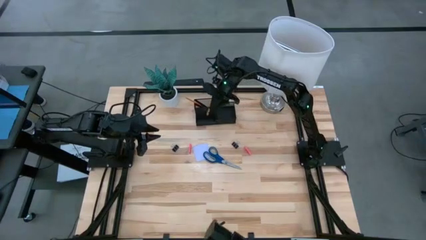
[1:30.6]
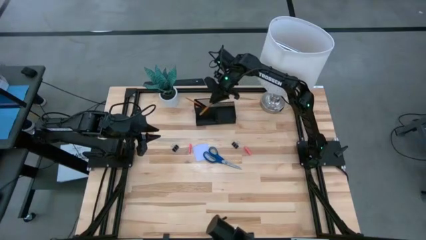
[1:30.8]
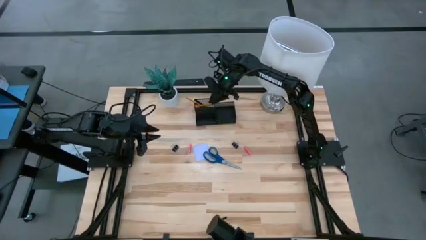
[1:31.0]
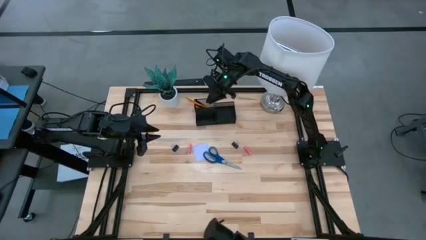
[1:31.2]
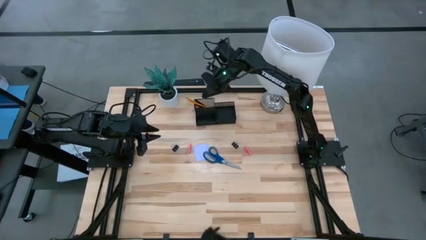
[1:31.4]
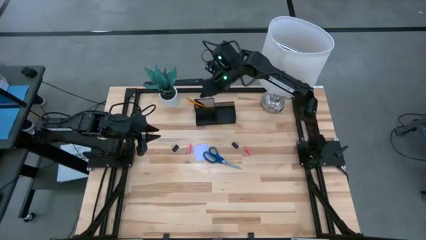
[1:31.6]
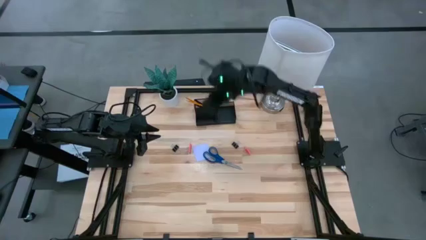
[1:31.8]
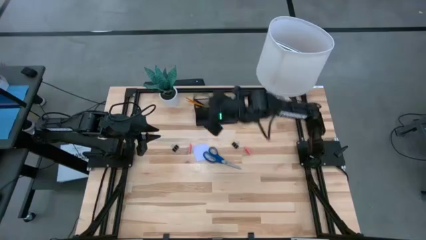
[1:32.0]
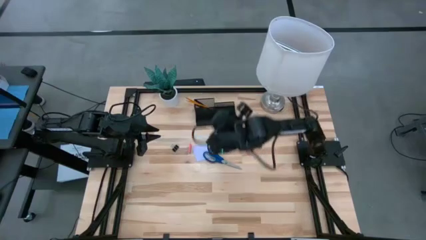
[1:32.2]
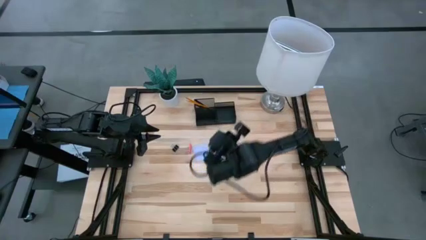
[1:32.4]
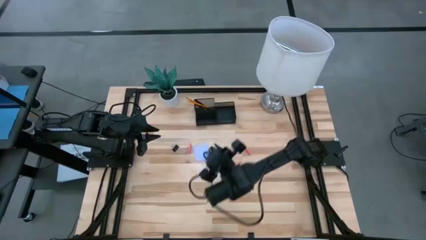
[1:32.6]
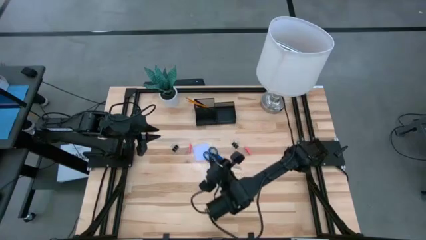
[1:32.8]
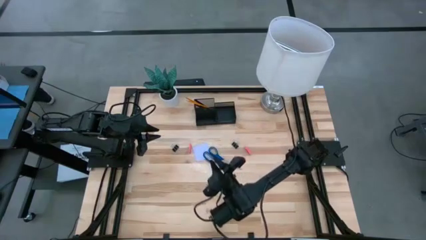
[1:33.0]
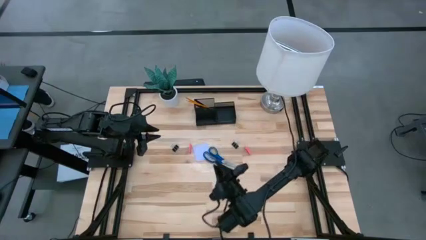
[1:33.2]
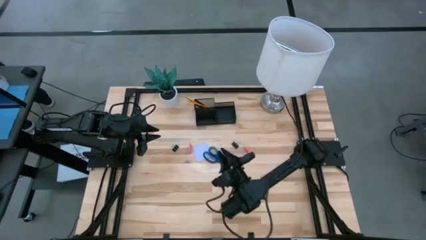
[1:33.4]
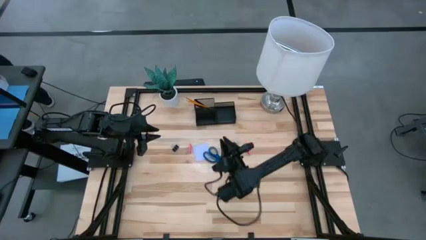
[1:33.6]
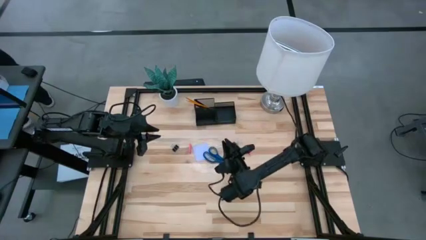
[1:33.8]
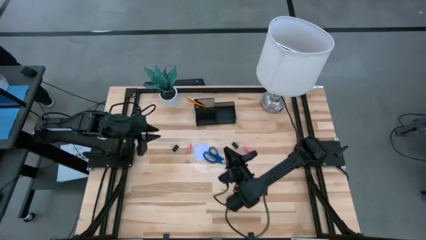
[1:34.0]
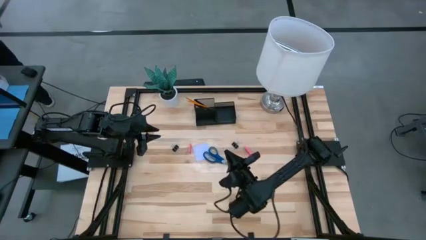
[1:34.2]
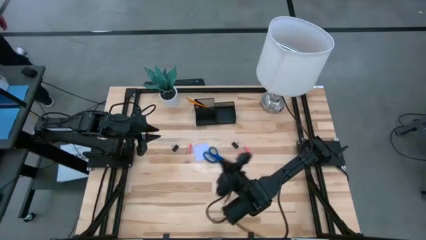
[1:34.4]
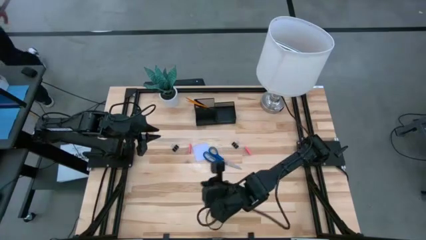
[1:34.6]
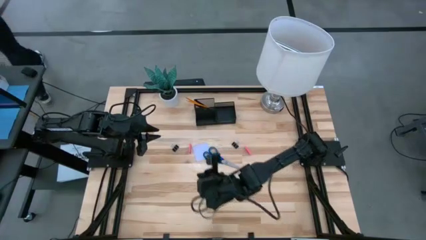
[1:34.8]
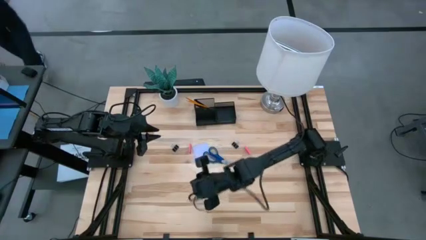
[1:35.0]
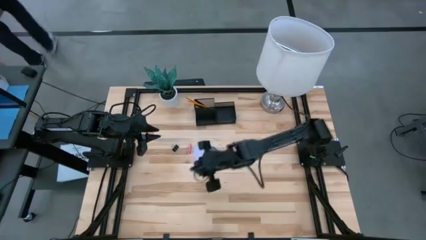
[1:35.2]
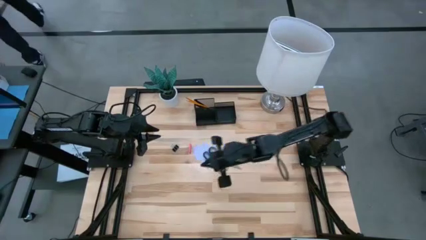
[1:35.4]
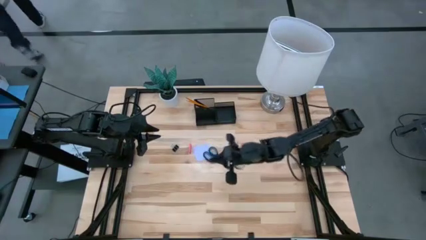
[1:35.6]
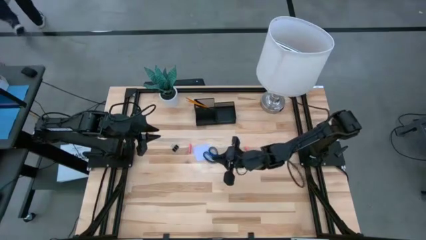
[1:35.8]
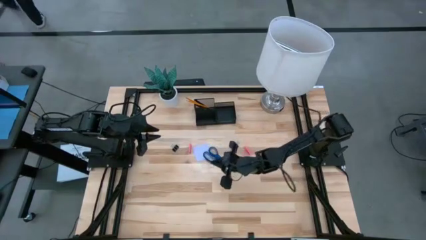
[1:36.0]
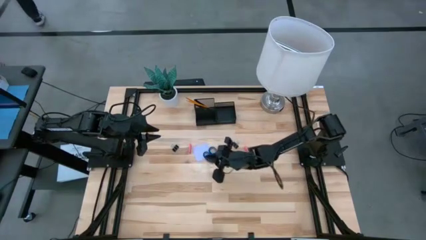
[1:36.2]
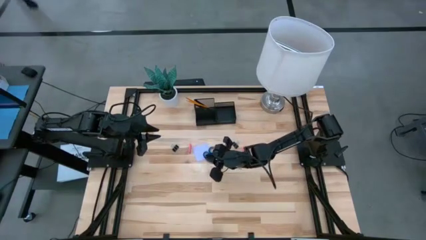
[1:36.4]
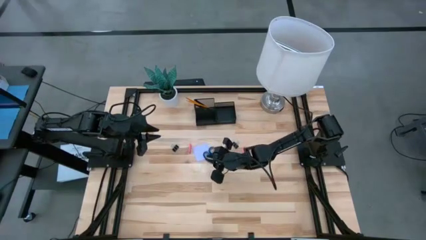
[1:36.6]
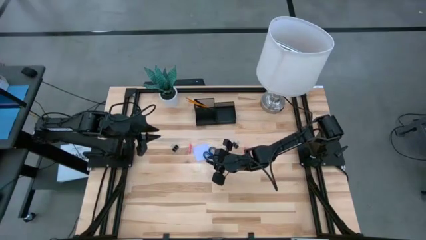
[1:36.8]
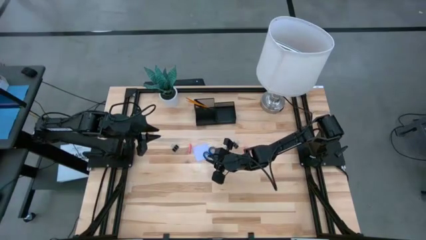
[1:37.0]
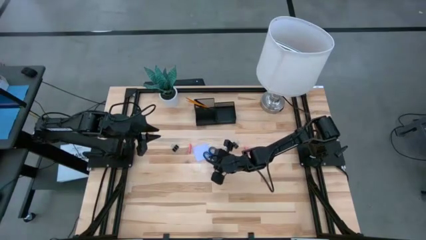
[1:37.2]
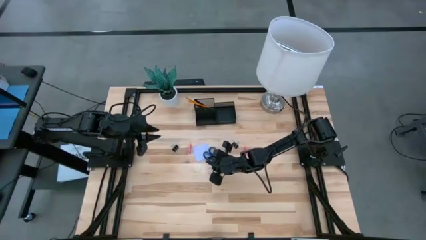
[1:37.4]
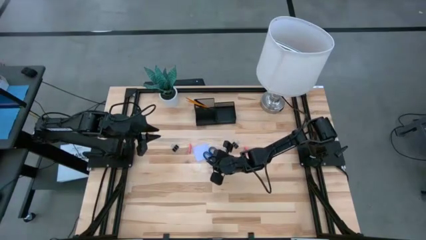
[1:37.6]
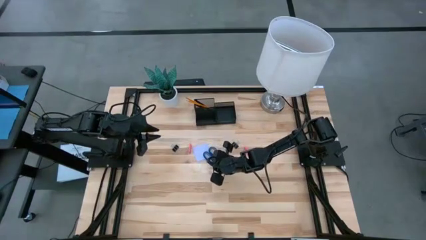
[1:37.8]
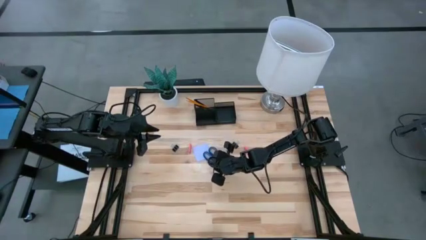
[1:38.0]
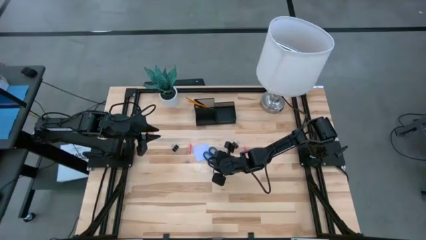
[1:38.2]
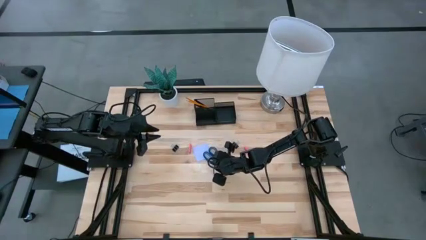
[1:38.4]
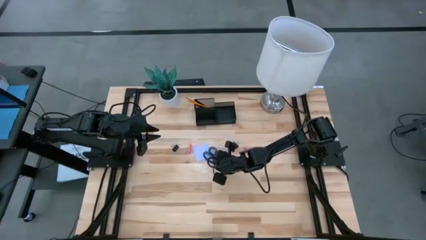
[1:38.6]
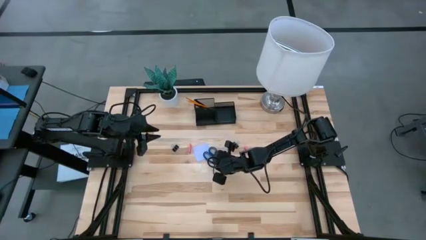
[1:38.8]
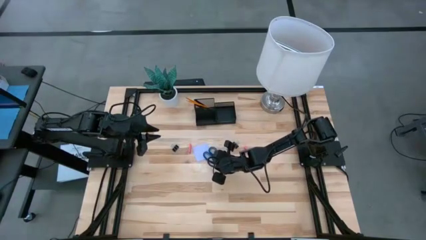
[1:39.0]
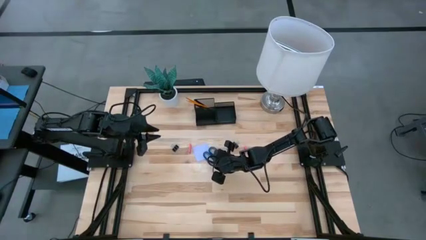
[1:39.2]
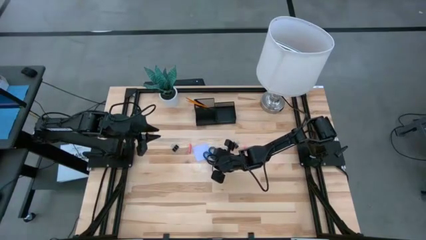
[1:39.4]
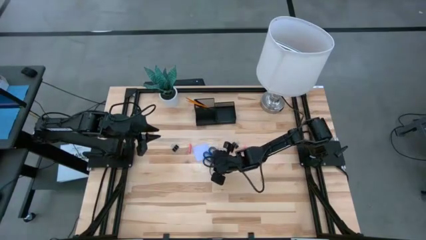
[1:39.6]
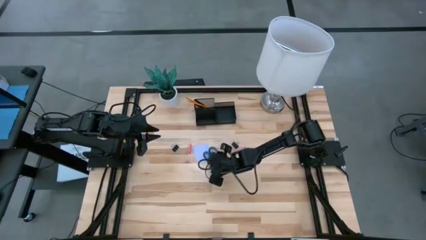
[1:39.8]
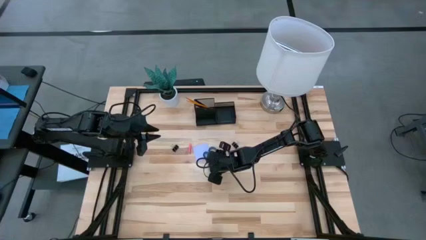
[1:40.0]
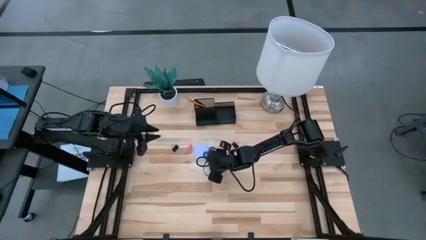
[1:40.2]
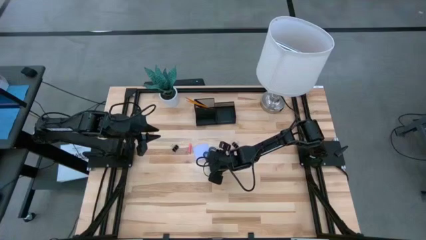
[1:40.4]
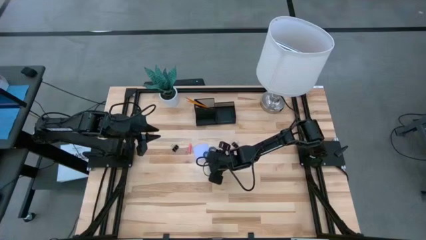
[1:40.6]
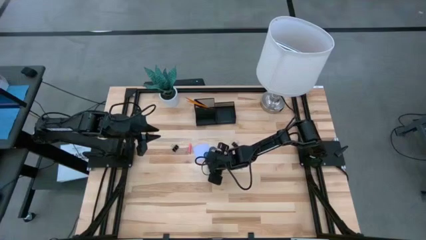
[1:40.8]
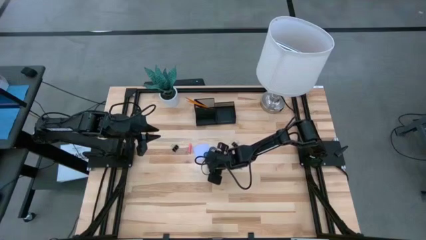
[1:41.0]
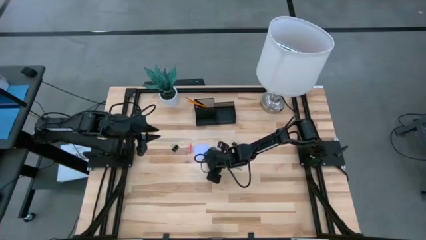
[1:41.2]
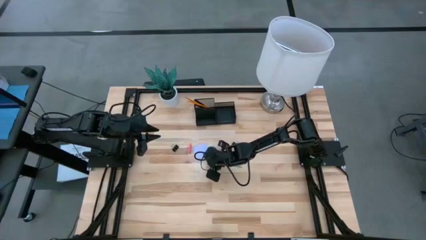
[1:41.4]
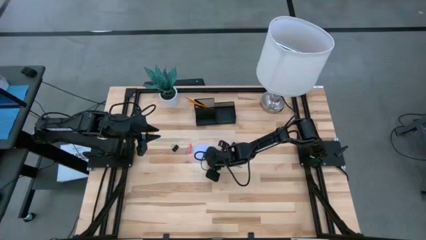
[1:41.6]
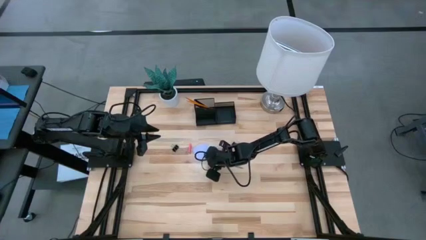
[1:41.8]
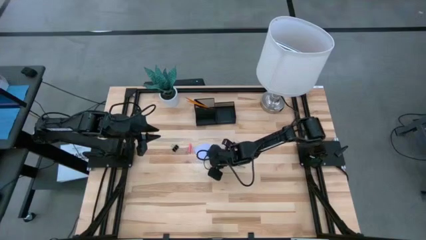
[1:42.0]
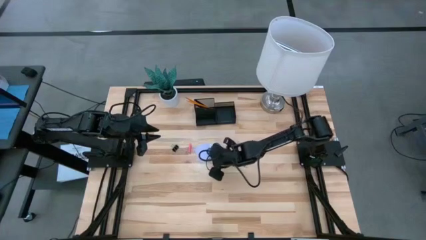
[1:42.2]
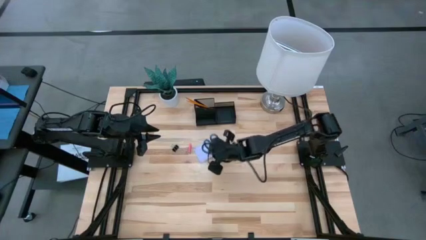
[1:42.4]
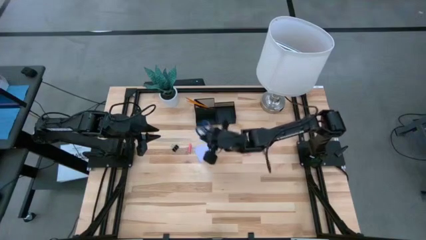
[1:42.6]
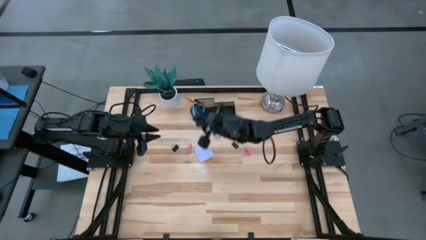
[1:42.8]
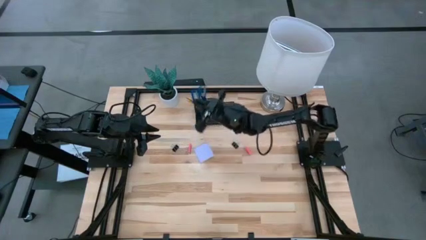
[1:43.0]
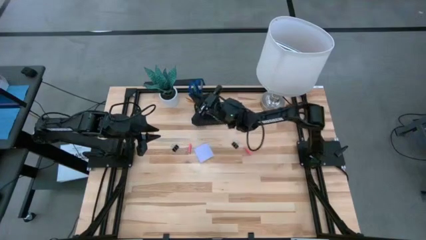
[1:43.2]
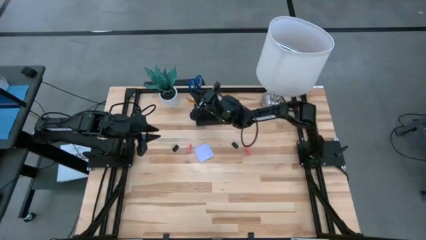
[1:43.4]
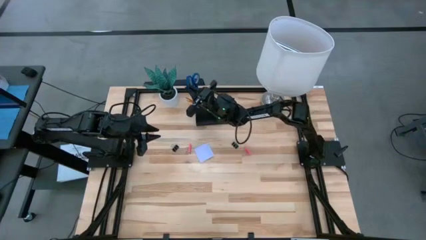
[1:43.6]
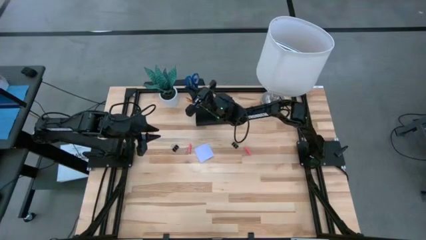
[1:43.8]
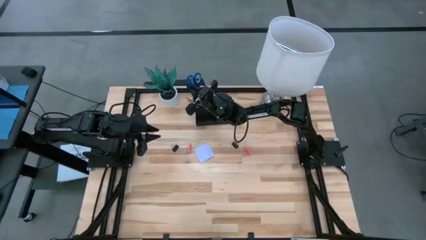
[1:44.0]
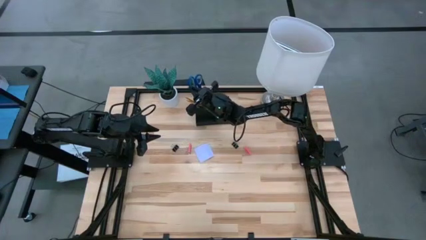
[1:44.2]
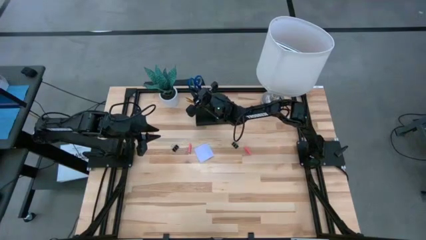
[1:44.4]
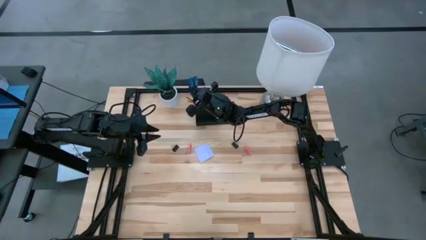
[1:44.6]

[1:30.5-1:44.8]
Task: Pick and place office supplies into organizer
Put the scissor into the desk organizer
